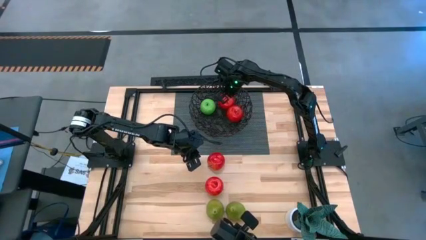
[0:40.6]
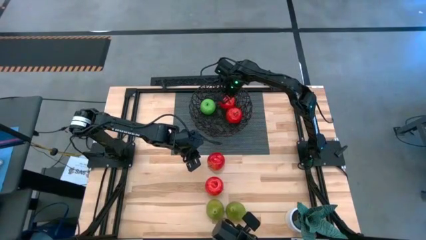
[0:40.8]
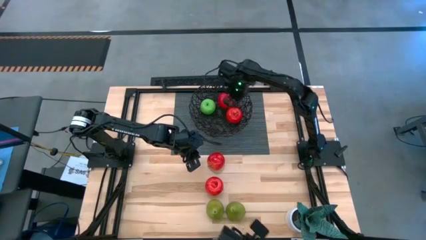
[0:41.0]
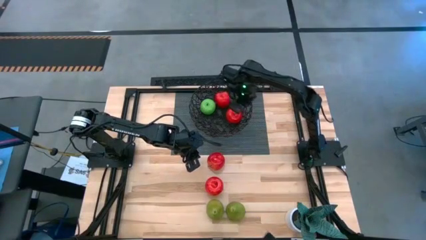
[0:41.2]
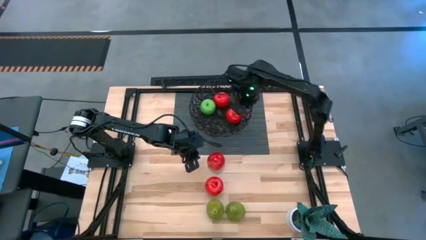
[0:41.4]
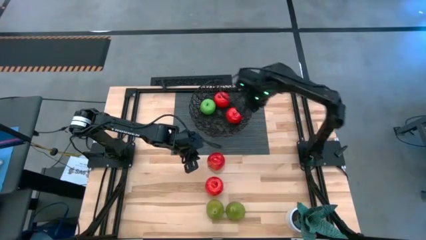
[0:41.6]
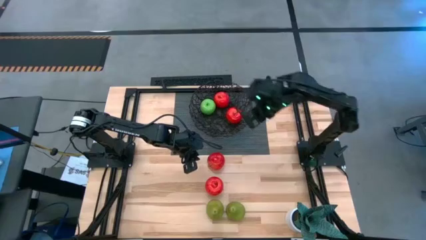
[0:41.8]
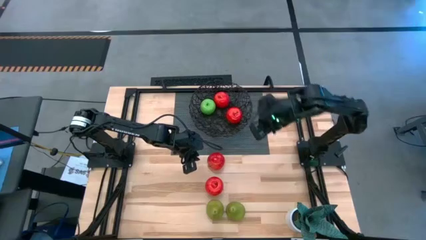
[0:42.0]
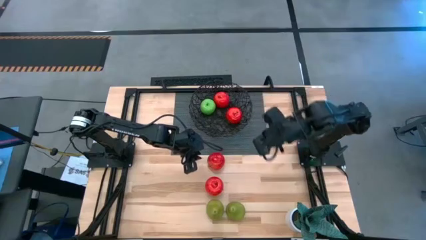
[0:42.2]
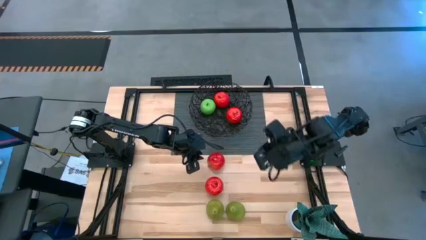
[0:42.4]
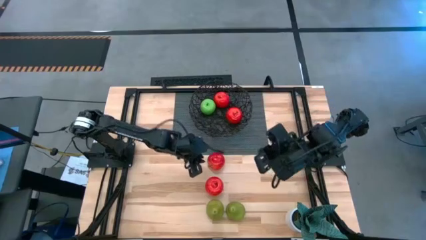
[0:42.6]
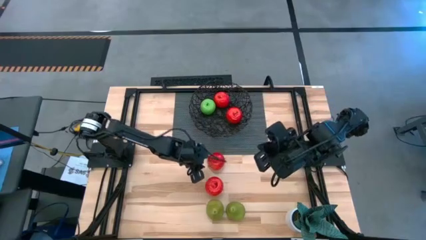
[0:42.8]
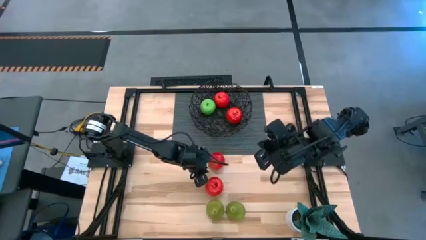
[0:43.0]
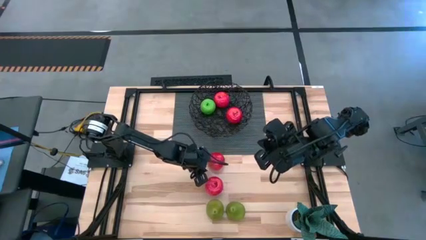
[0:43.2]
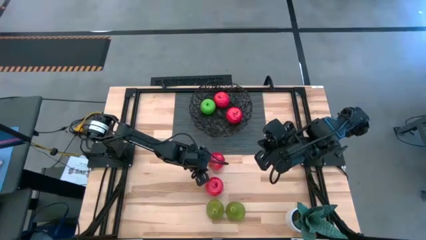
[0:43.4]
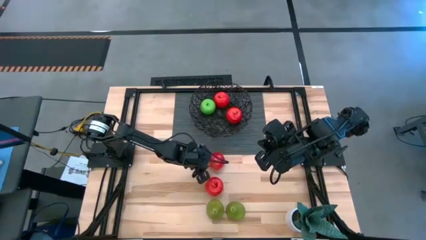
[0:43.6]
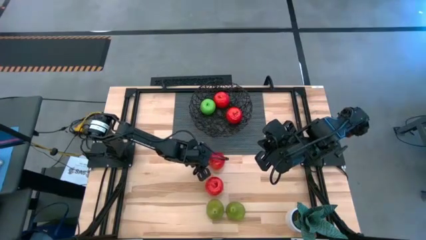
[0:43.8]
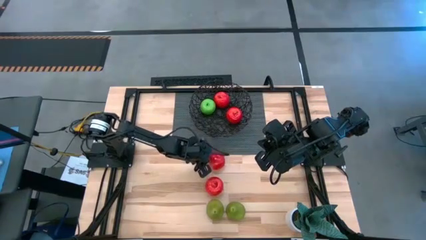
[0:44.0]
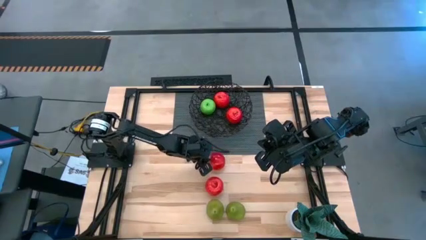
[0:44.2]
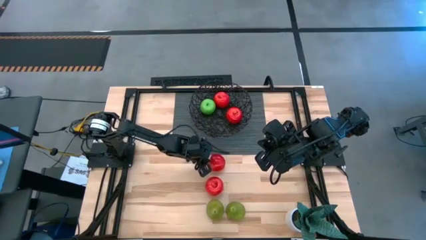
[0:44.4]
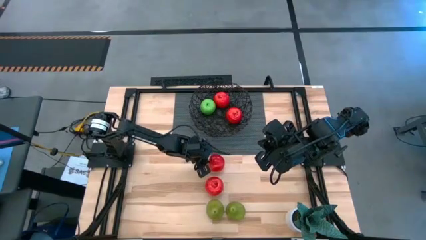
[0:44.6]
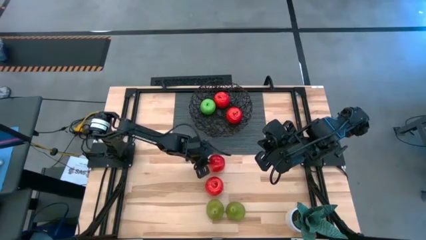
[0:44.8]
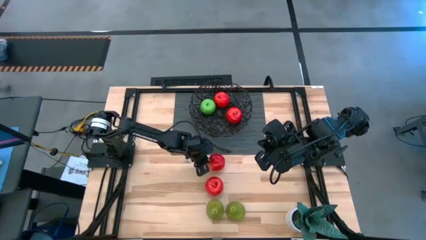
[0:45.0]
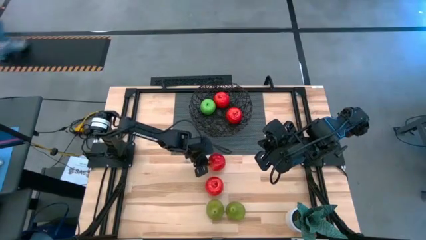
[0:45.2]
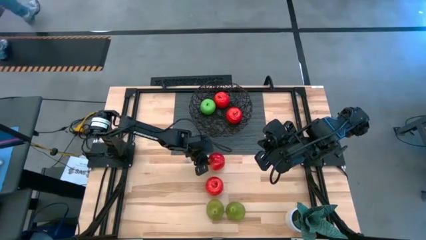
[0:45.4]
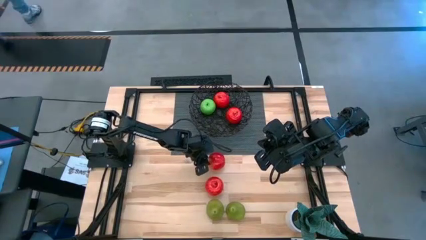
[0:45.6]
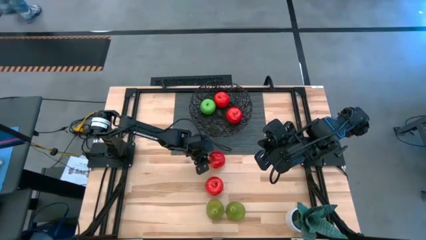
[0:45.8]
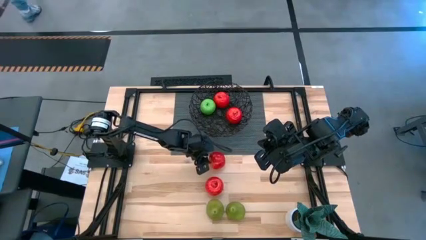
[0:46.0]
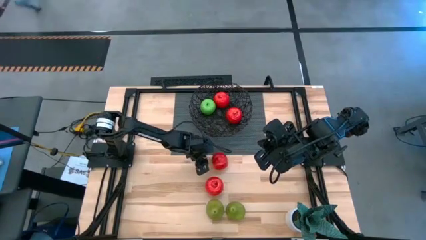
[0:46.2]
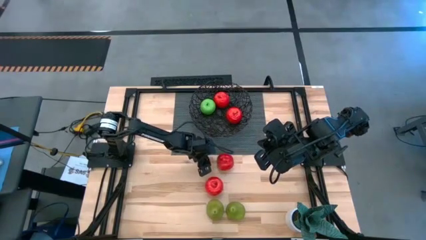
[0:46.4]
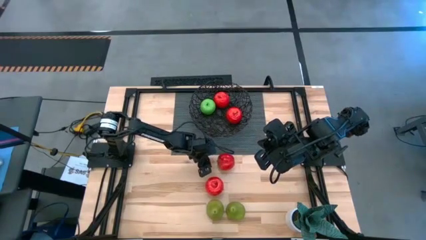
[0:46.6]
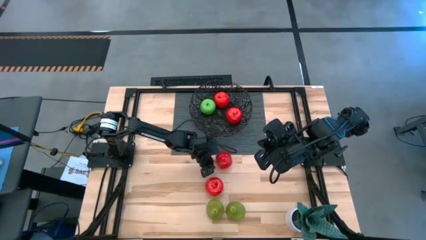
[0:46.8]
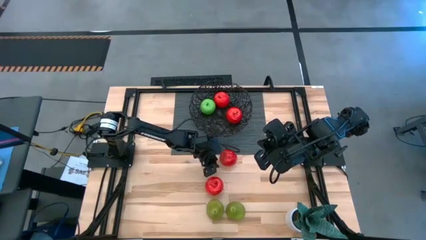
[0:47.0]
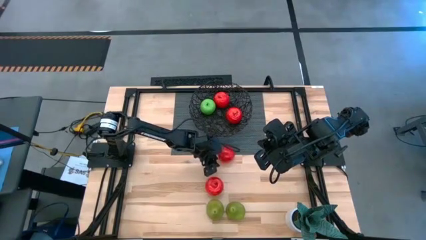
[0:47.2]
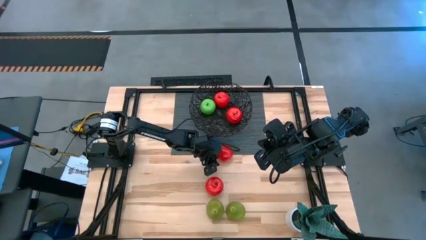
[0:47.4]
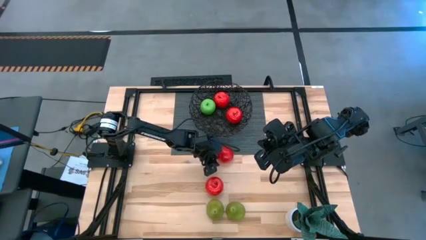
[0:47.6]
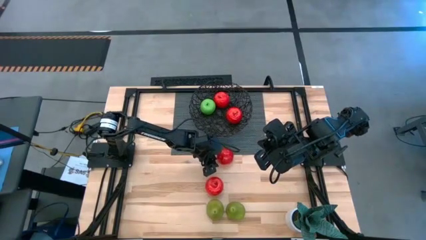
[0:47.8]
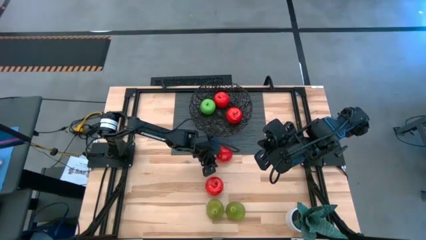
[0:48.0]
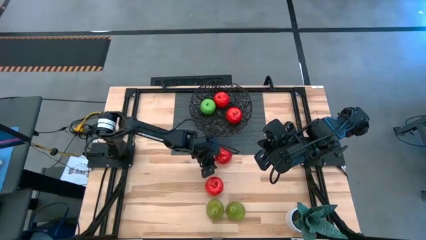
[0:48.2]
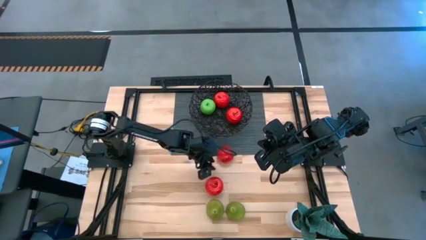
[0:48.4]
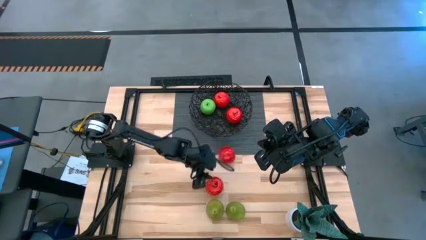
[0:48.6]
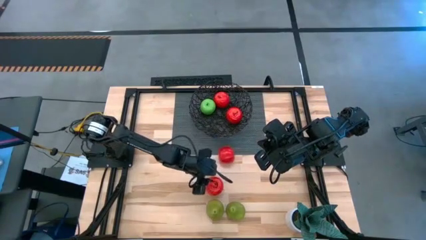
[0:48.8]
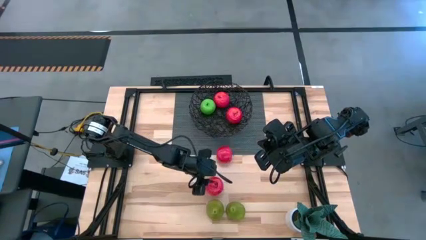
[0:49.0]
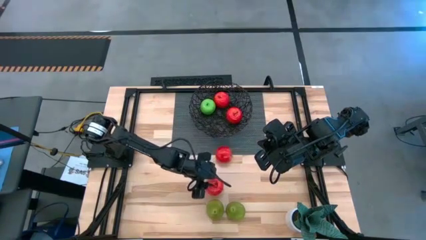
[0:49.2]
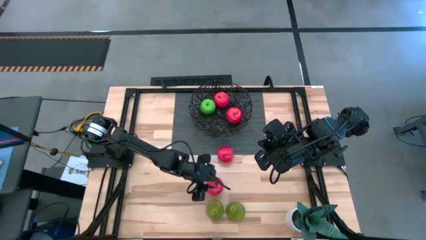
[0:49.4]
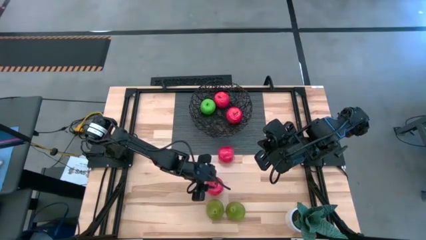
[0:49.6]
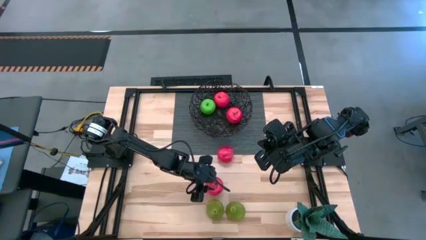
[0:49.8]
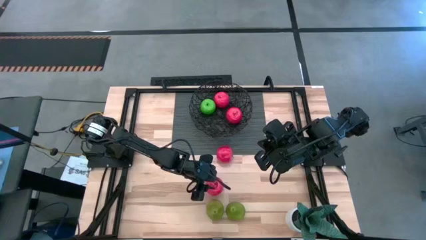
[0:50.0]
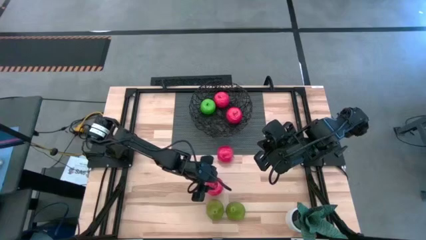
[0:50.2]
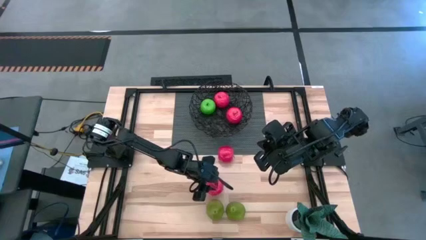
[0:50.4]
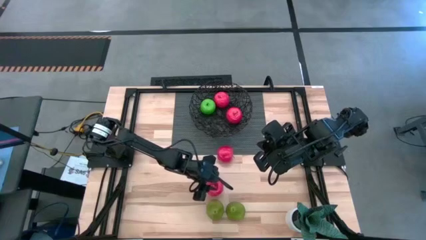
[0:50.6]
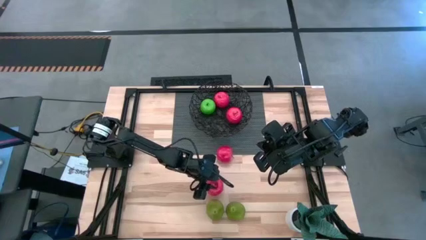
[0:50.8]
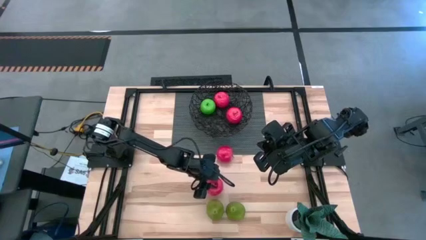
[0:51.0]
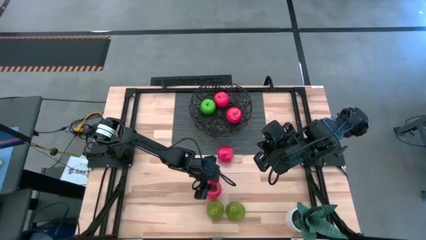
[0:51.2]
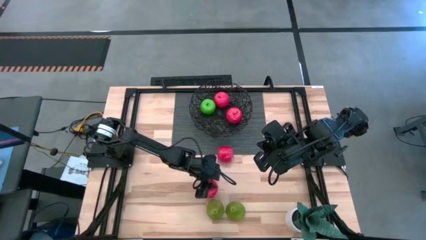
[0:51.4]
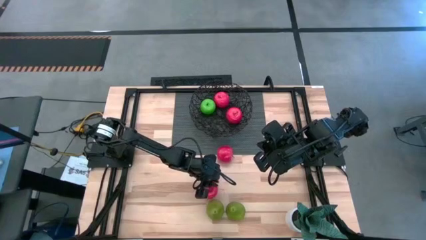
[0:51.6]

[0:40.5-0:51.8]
Task: Build produce basket
Put the bottom red apple into the basket
